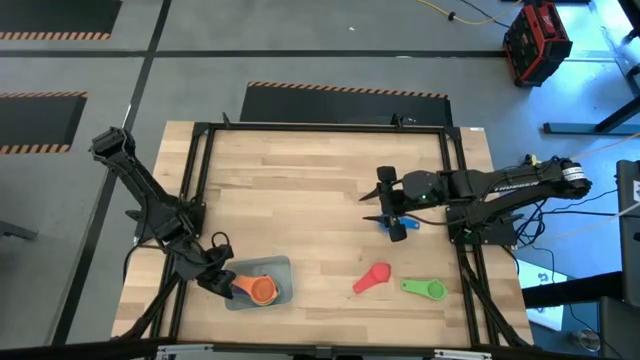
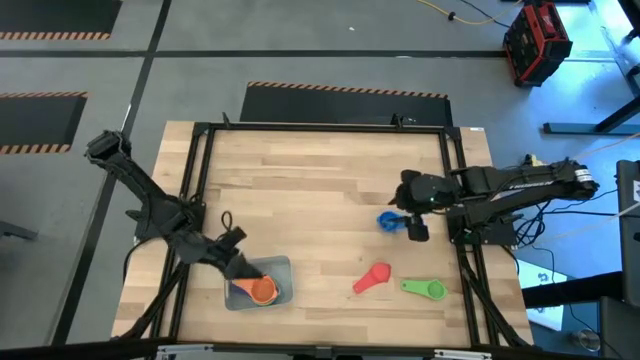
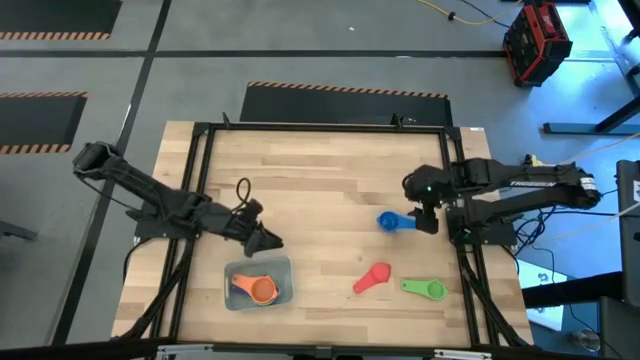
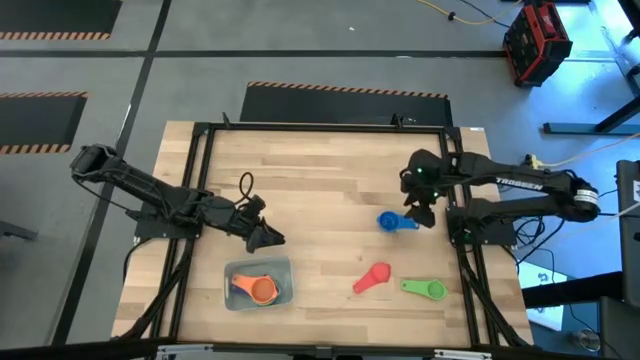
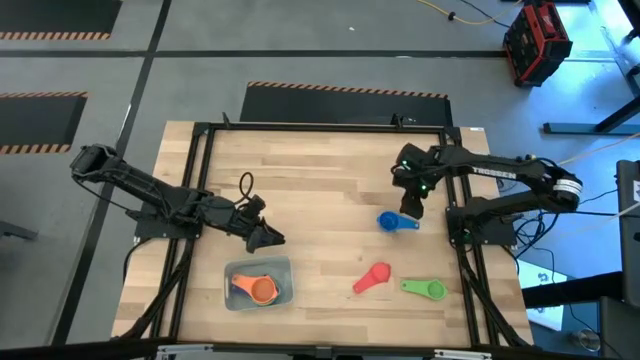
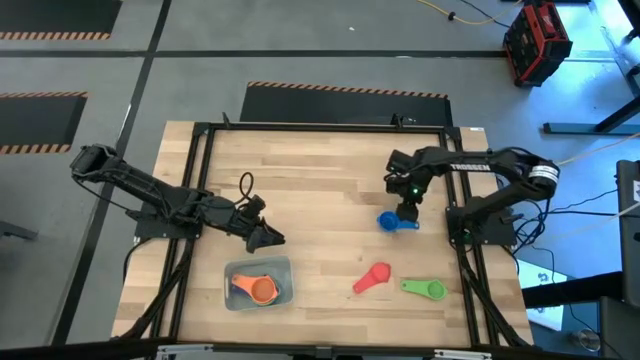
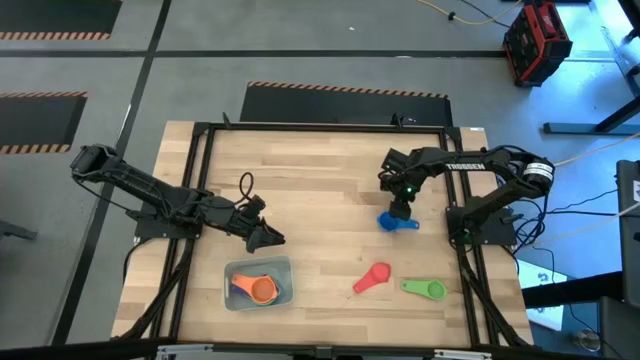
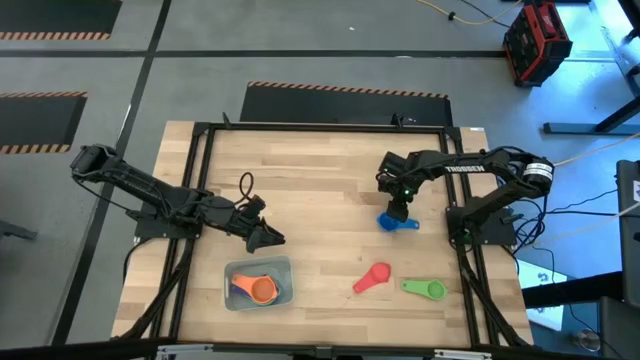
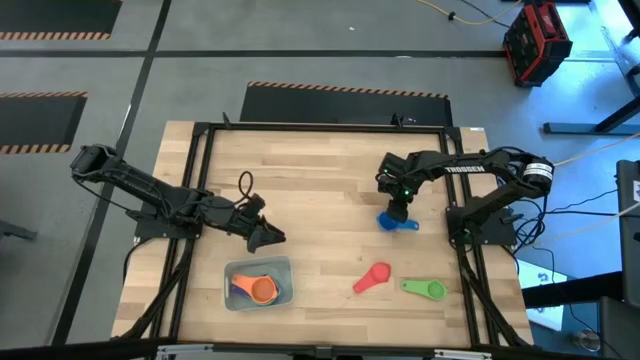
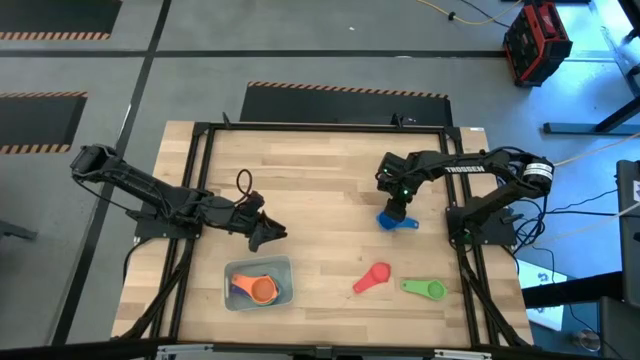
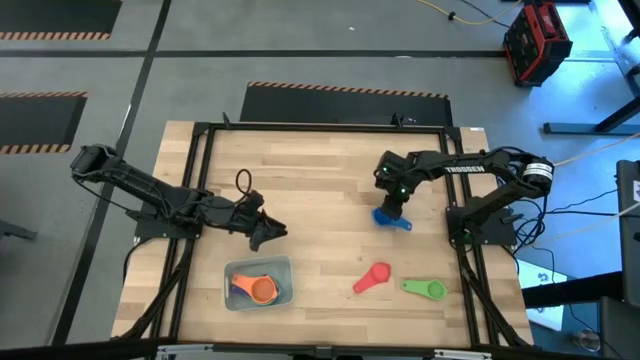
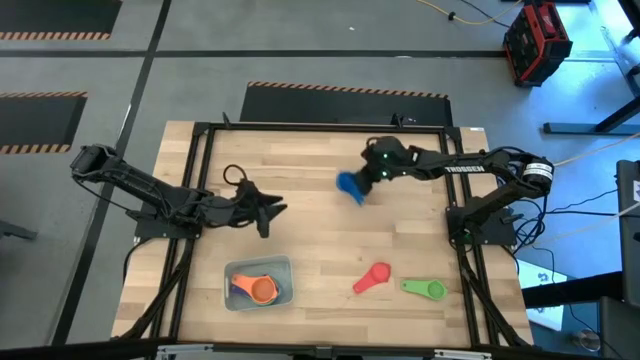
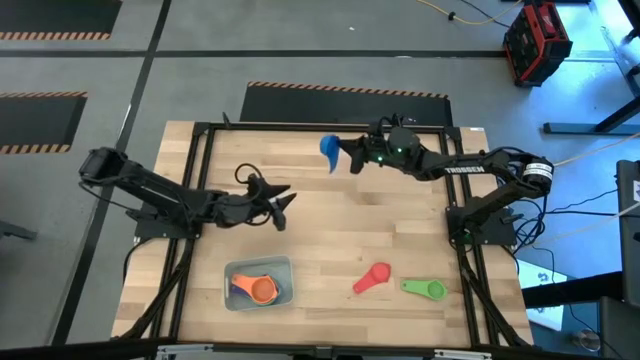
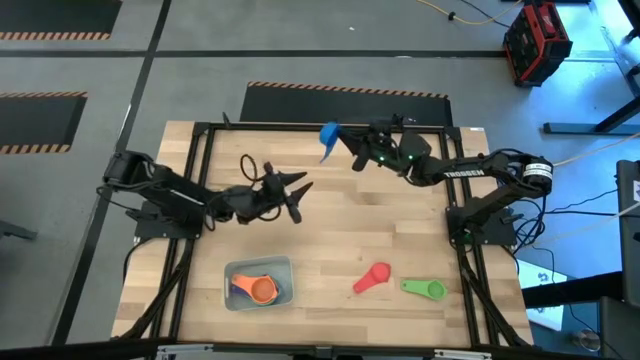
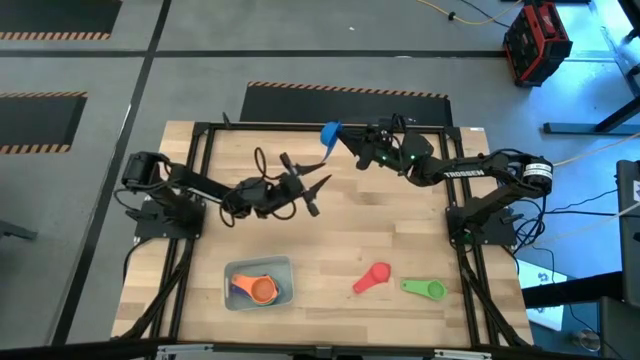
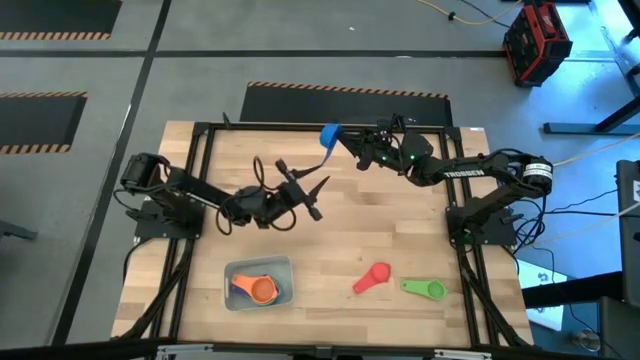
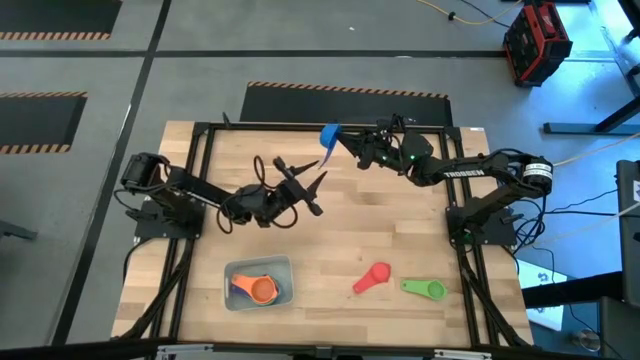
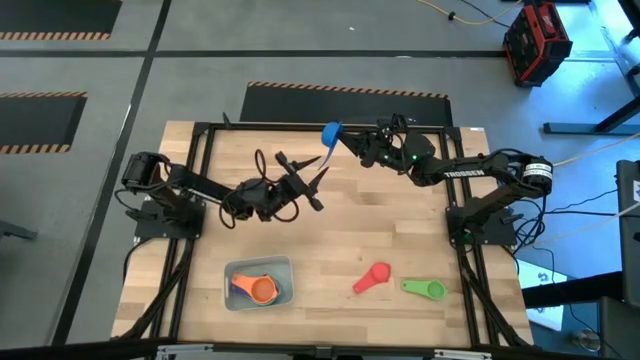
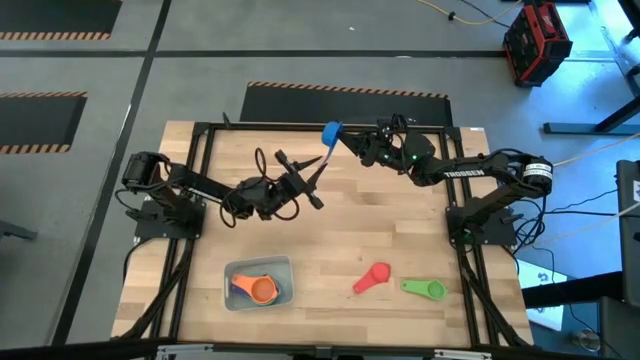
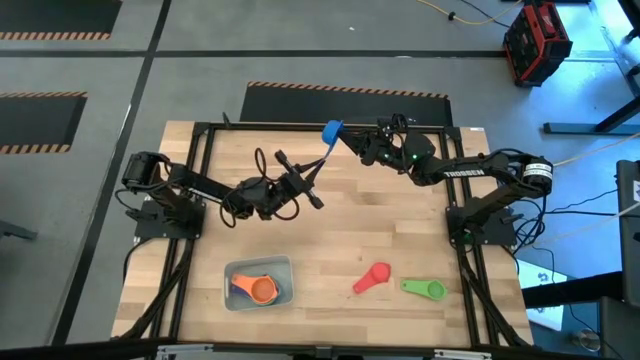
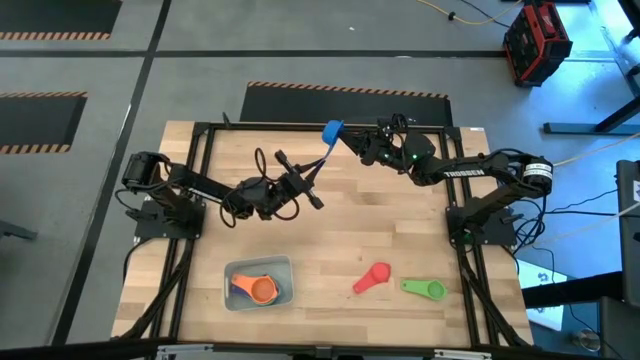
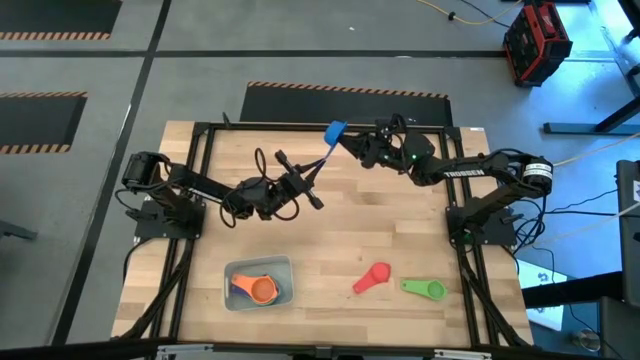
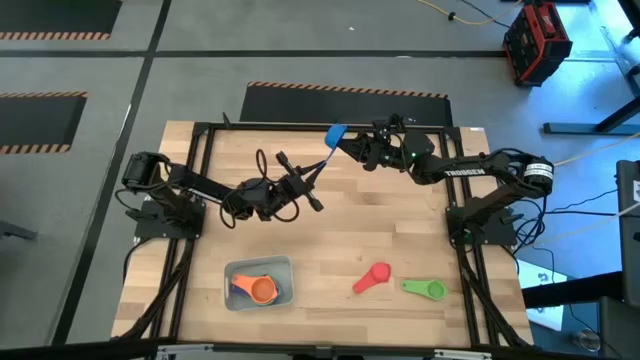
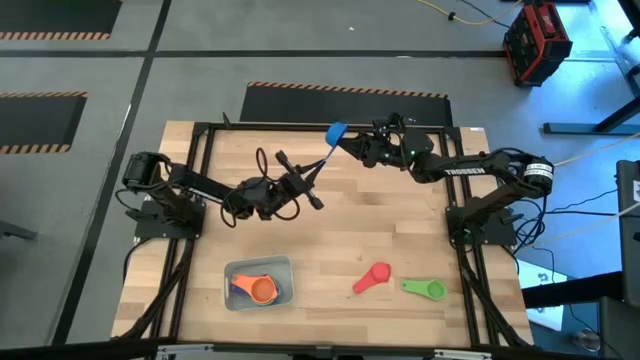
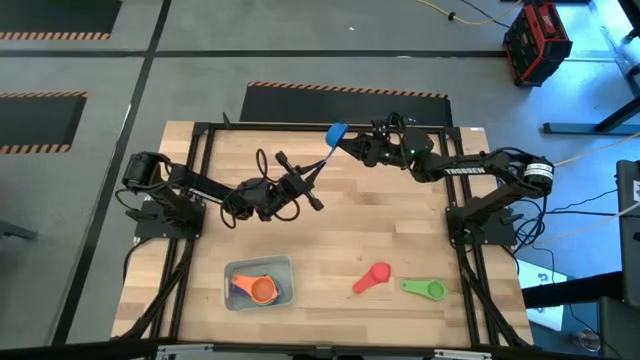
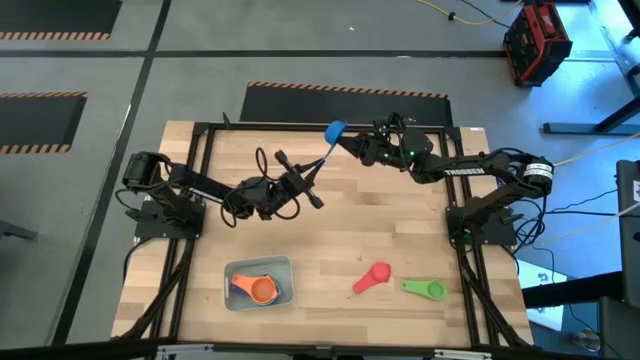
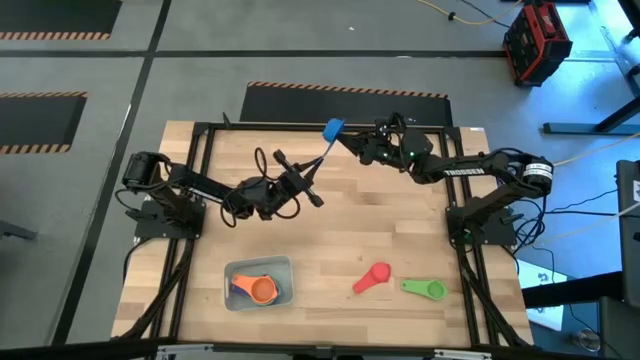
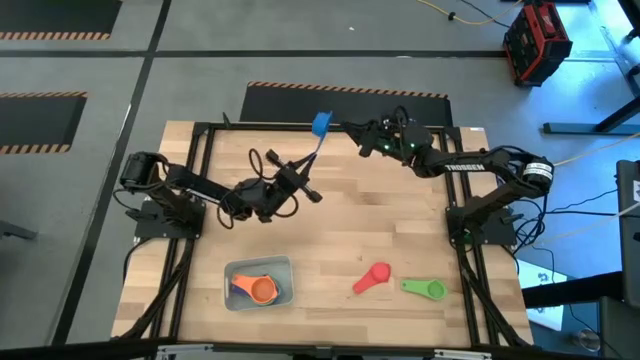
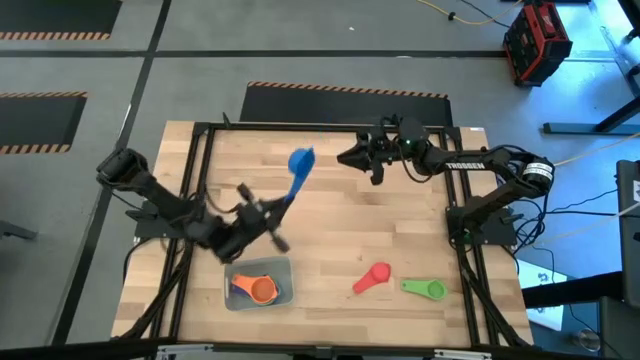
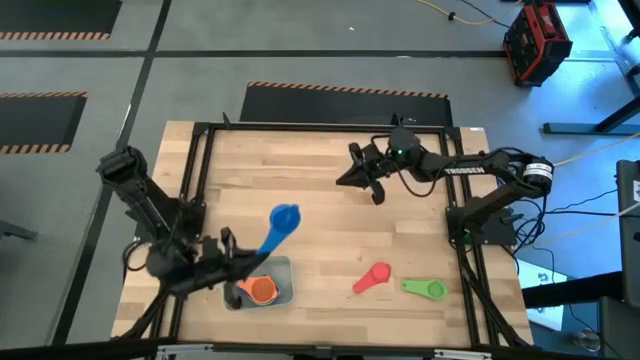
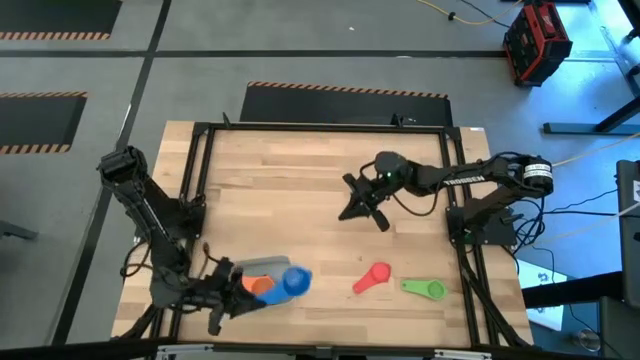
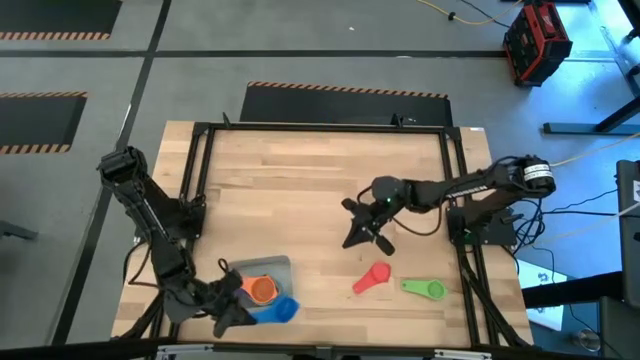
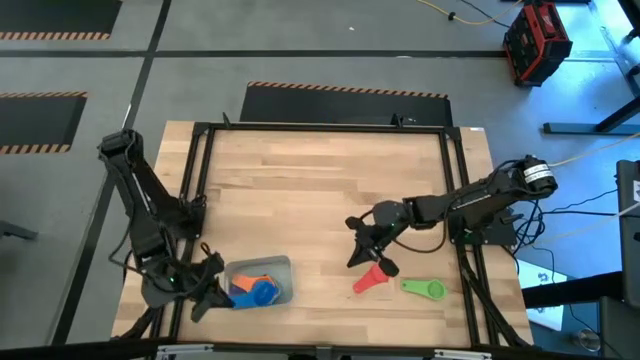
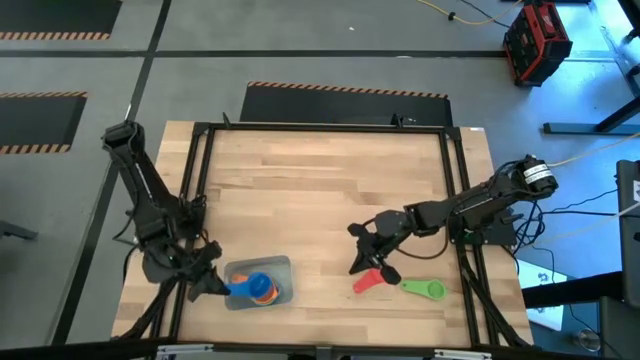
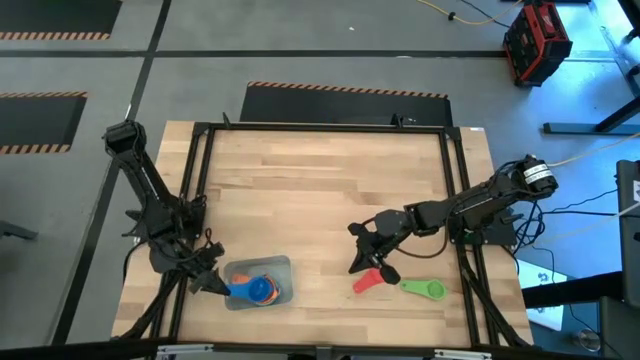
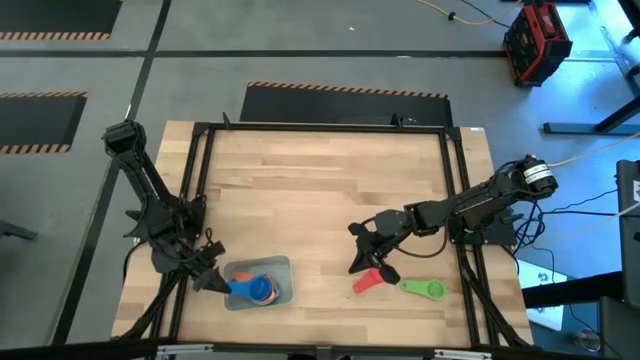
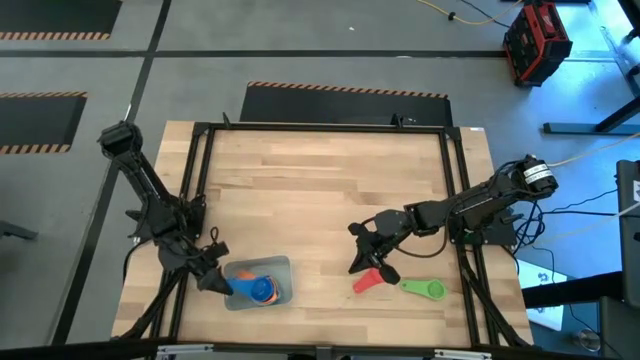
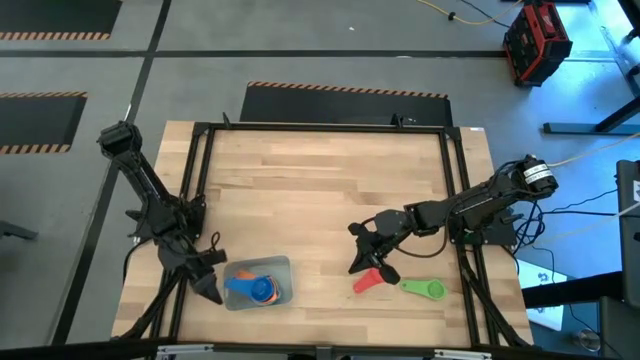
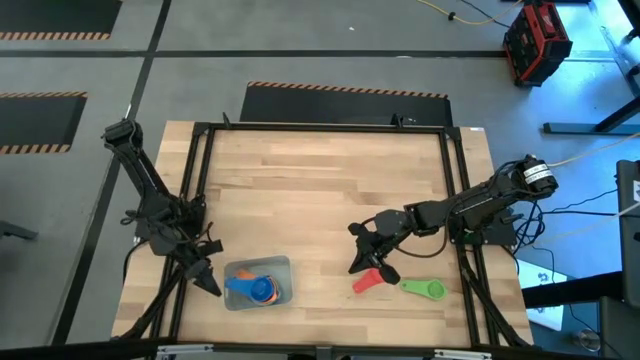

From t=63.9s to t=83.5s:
Task: Nest measuring cups in basket
Stack the blue measuring cup on top of the orange measuring cup in the gray bin

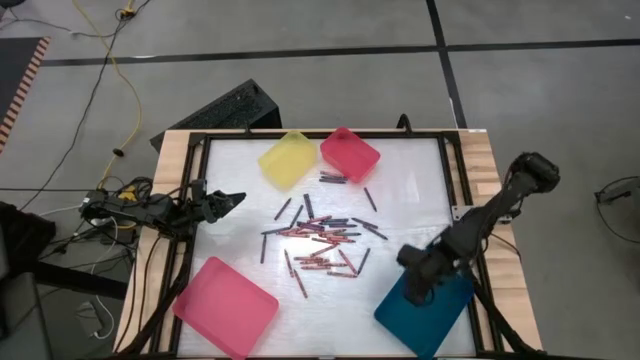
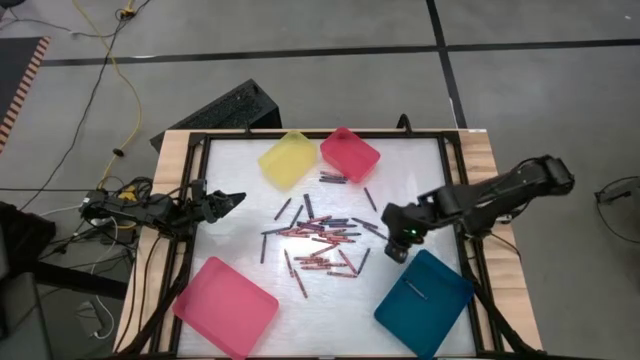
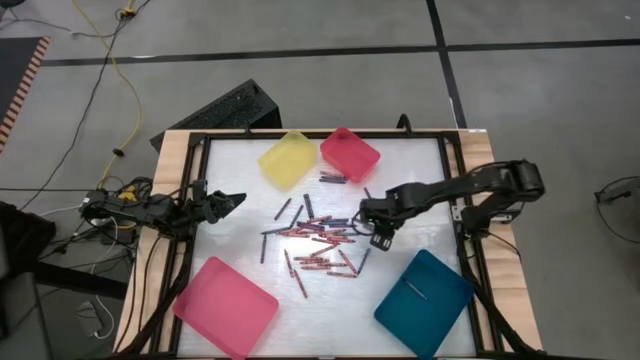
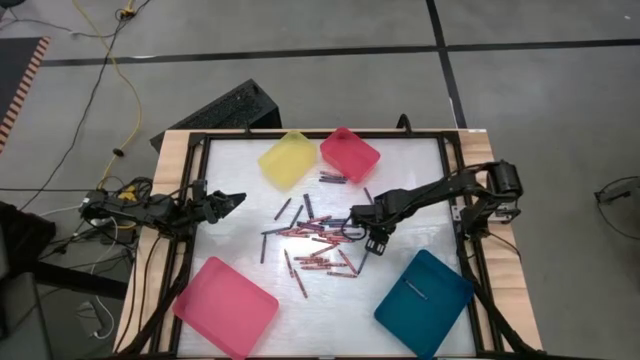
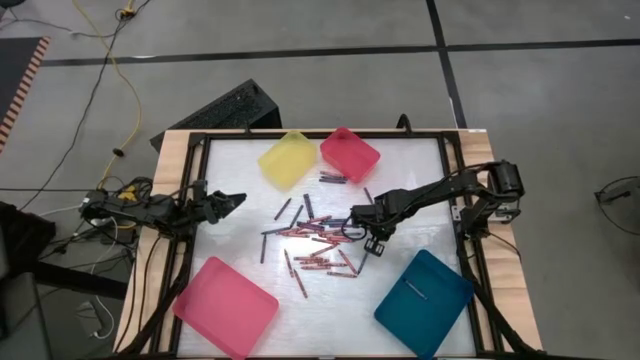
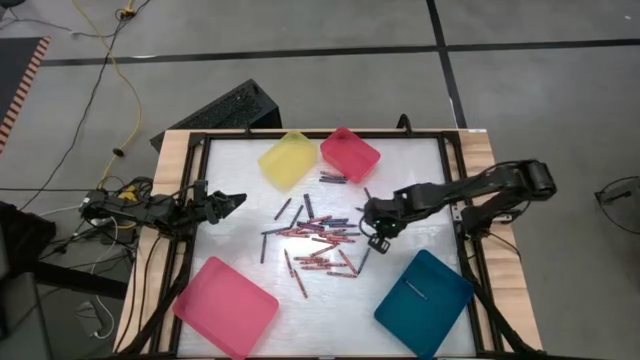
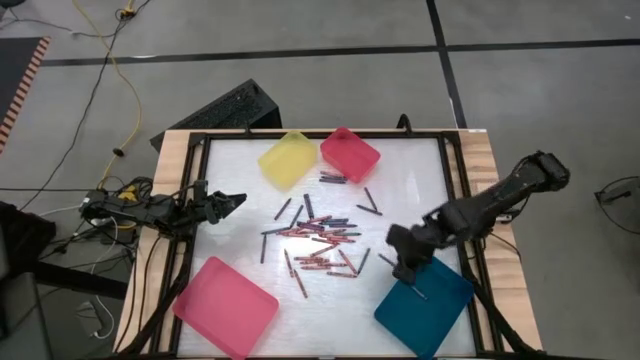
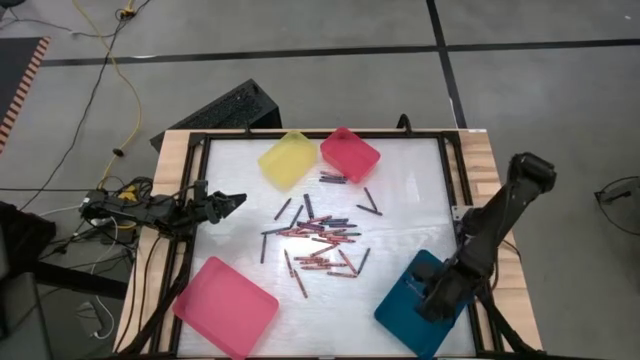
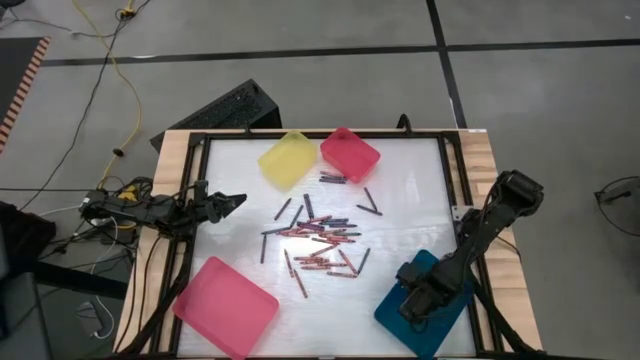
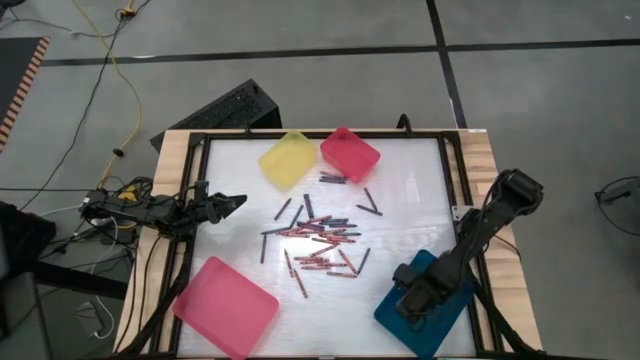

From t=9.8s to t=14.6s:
Task: Sort crayons
Put the blue crayon into the blue bin
